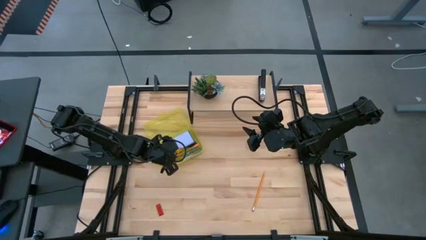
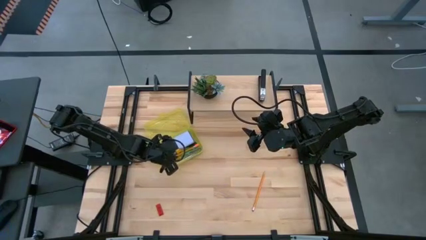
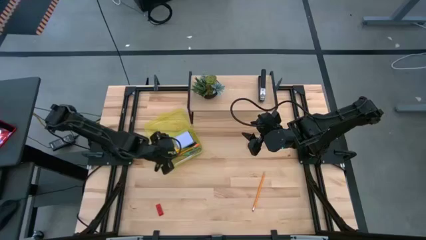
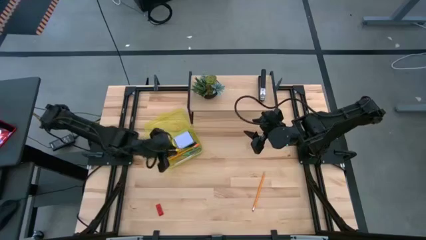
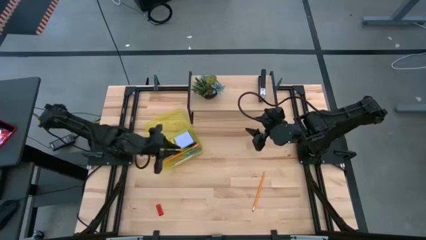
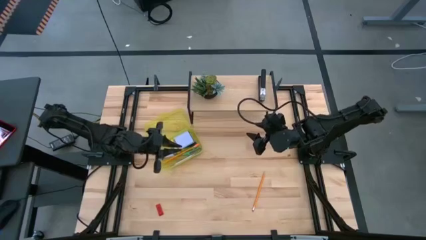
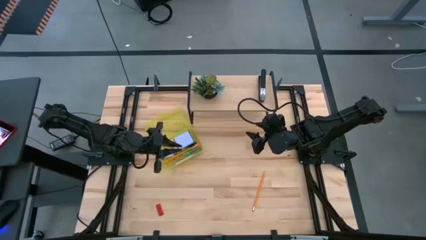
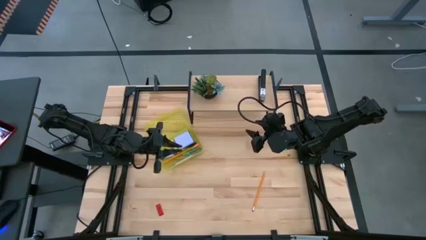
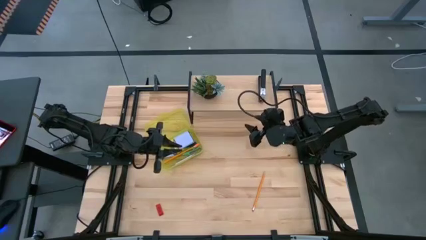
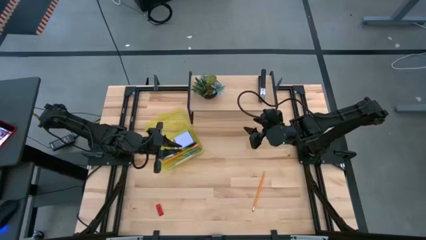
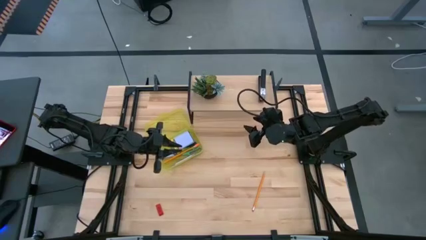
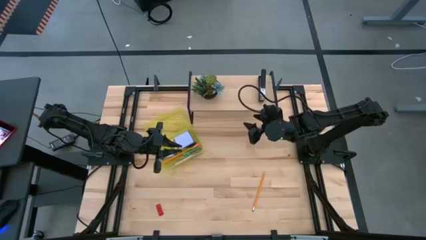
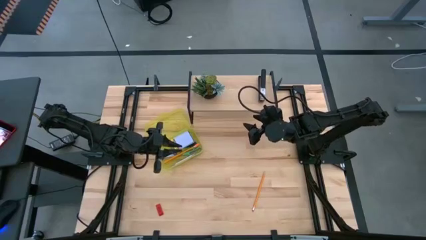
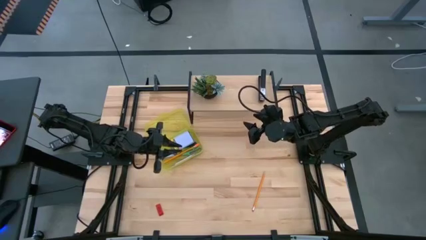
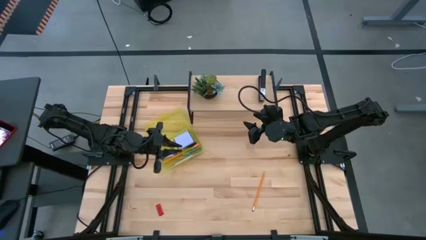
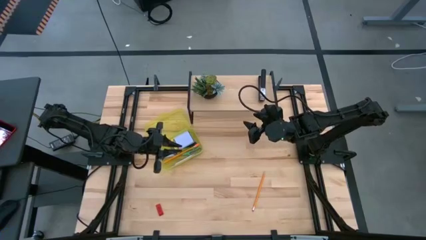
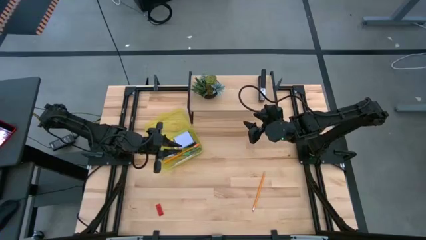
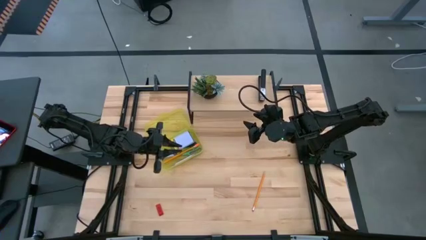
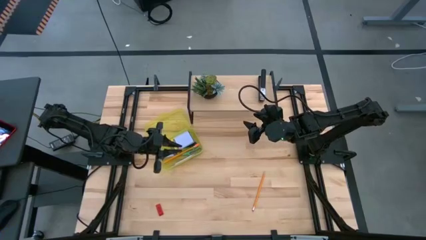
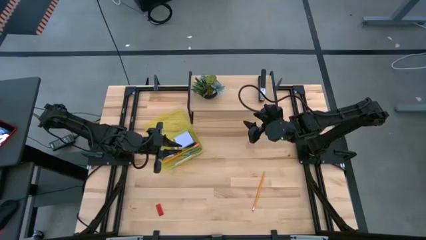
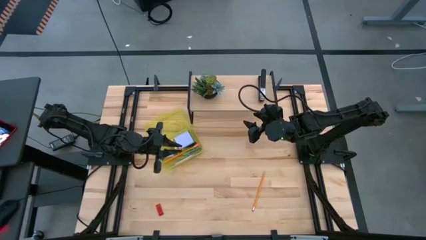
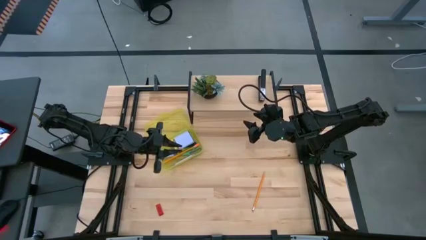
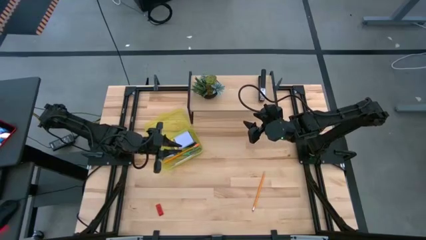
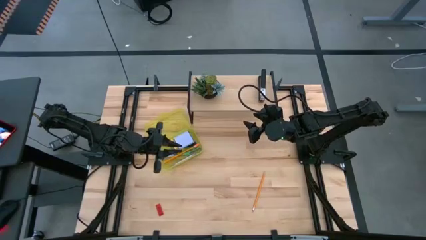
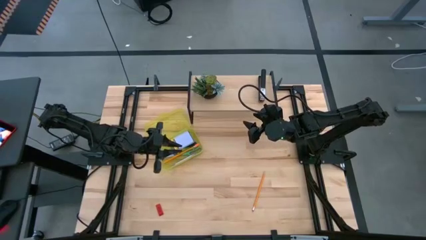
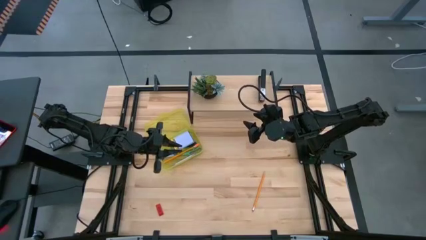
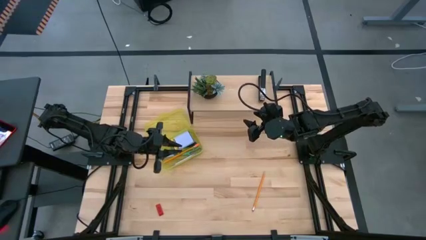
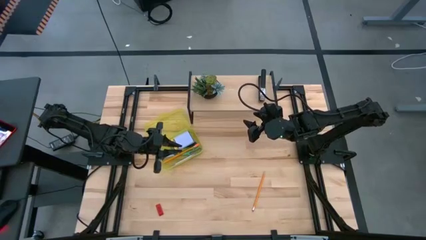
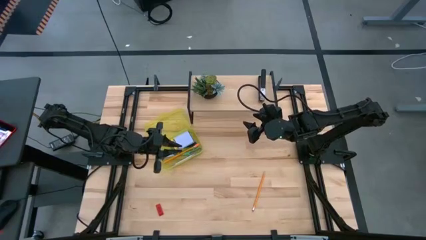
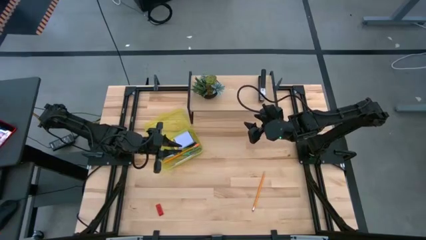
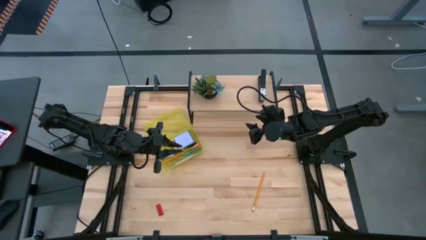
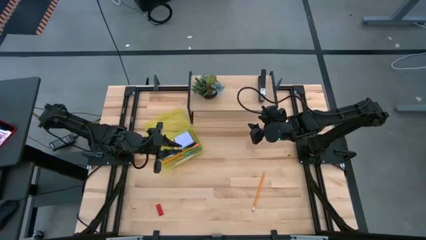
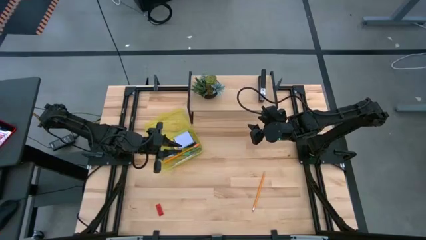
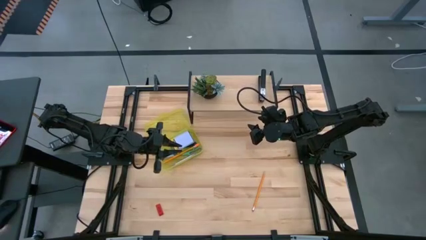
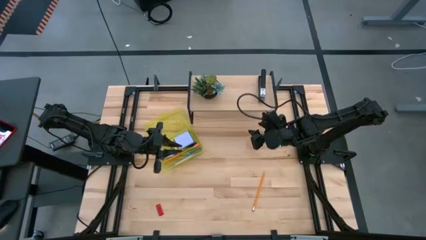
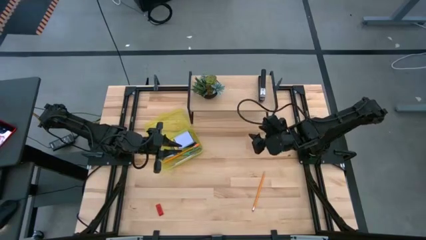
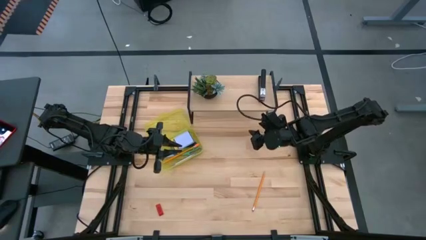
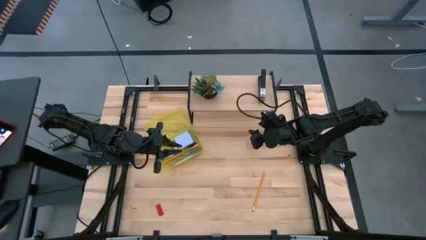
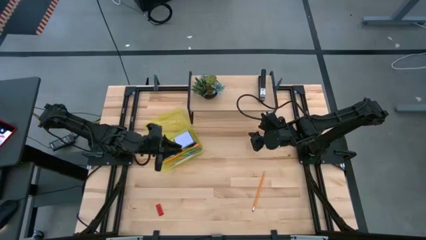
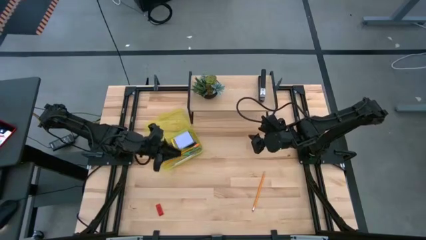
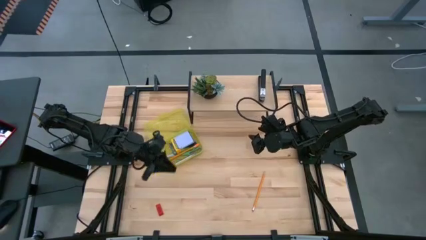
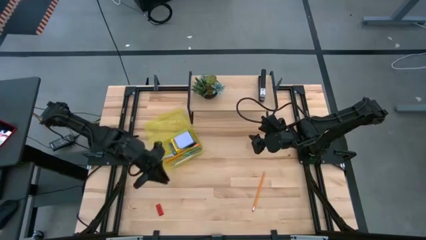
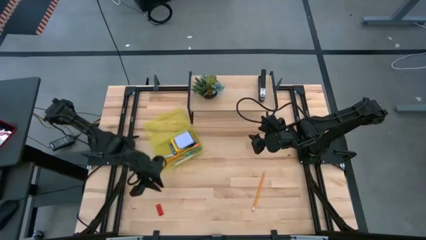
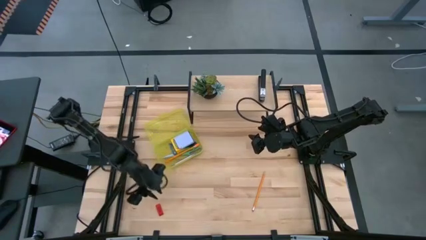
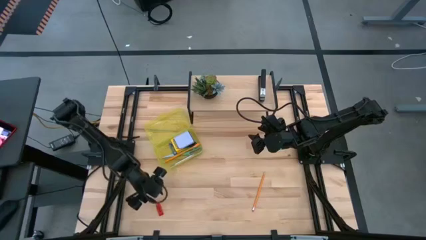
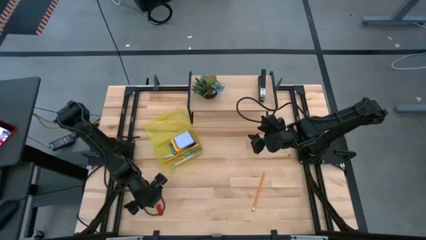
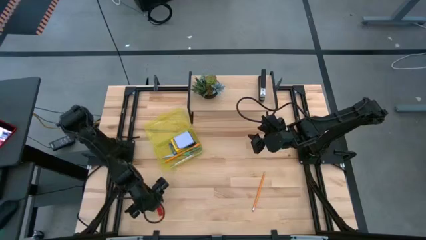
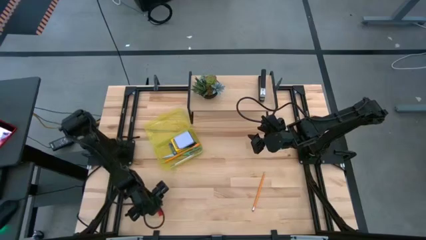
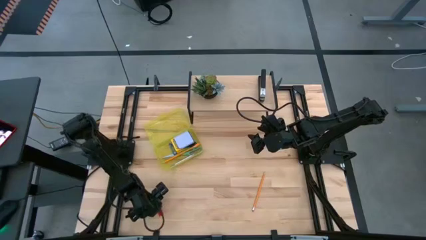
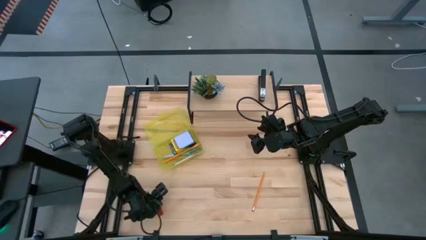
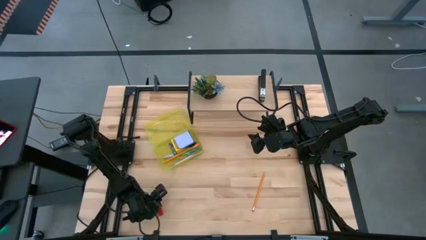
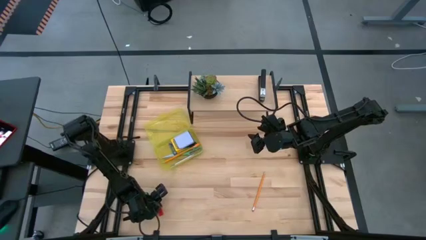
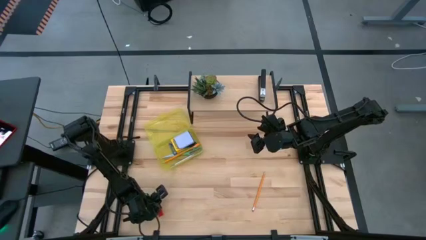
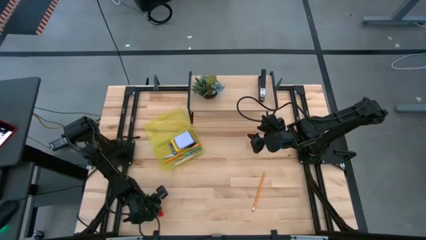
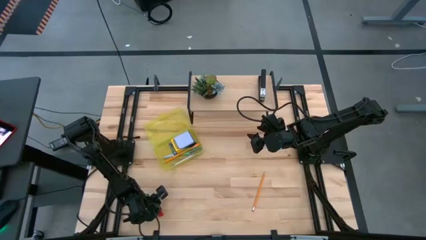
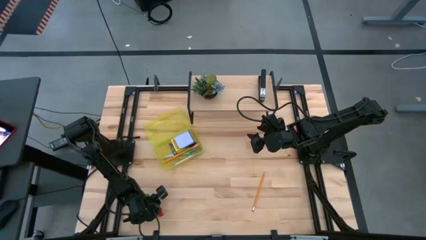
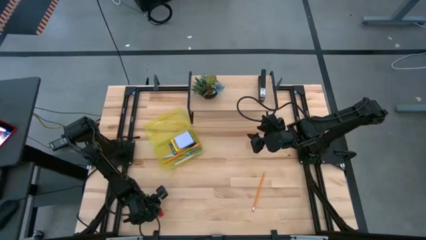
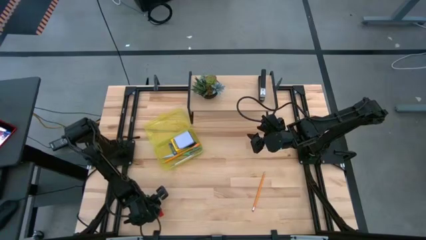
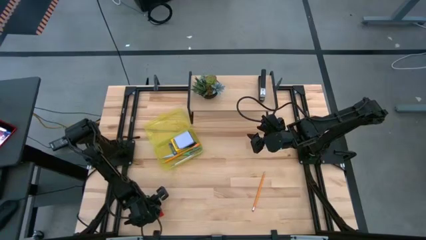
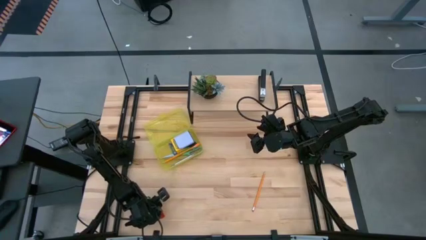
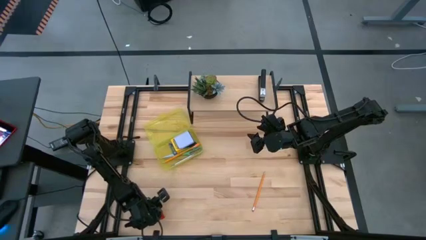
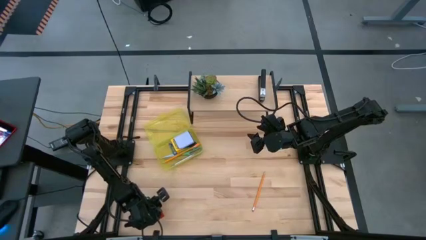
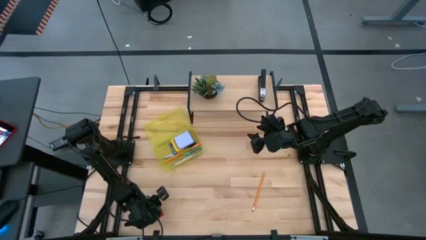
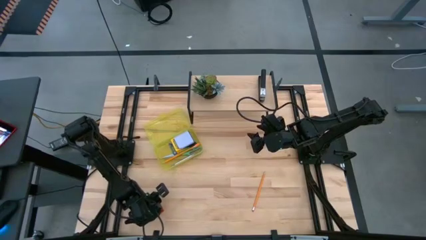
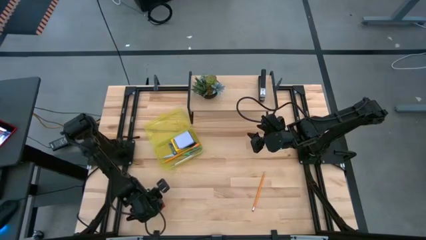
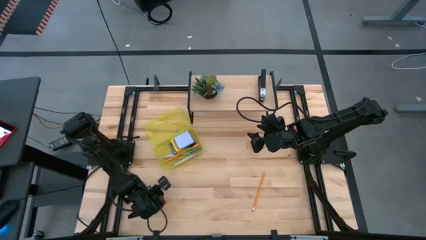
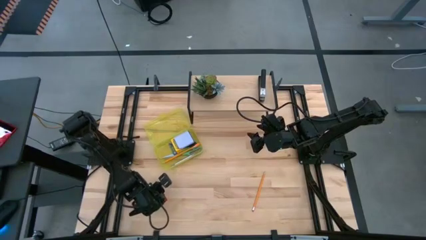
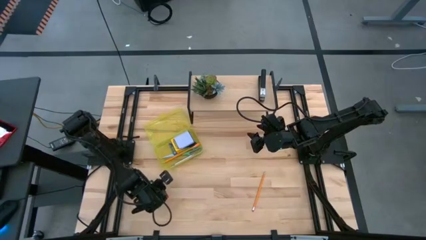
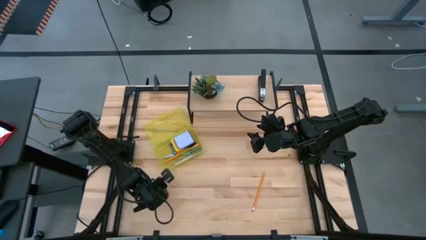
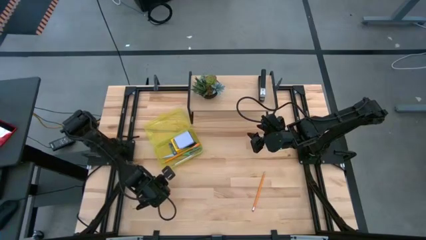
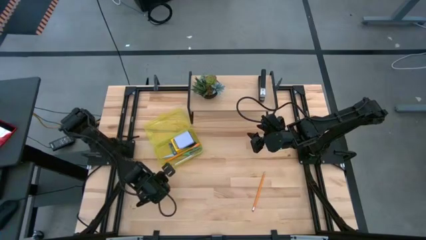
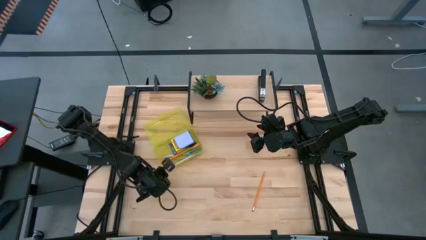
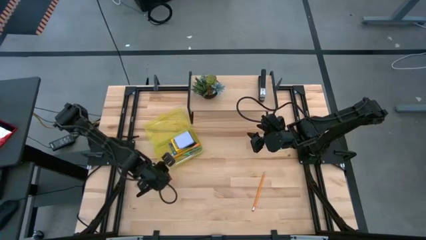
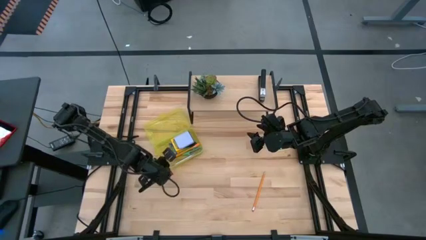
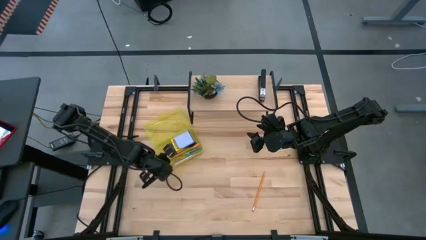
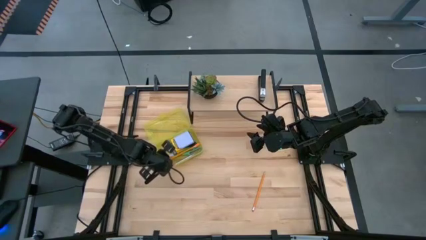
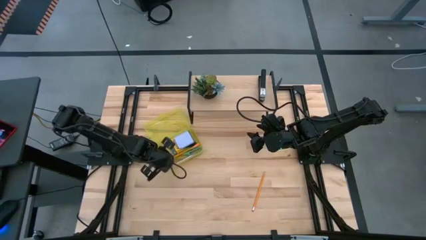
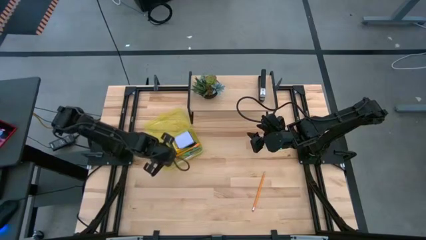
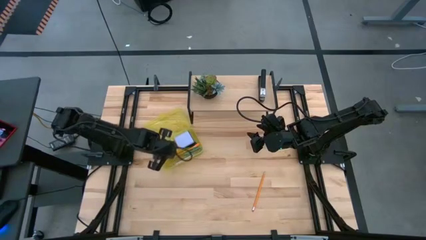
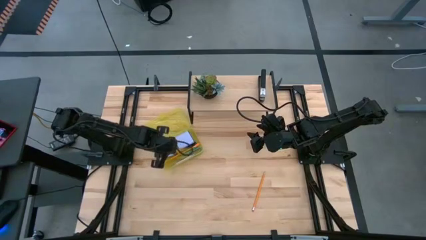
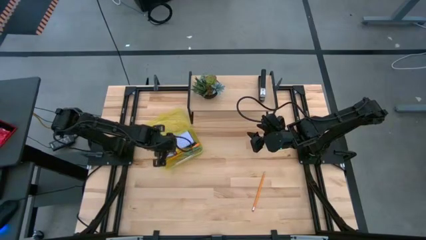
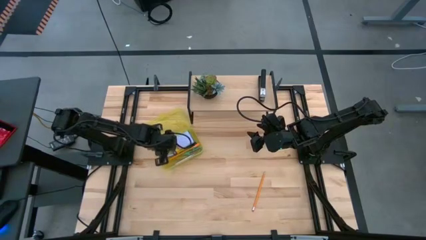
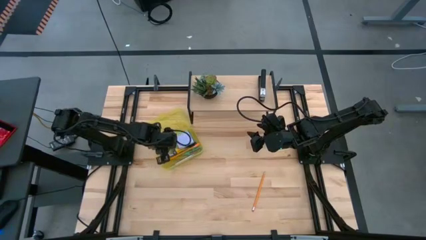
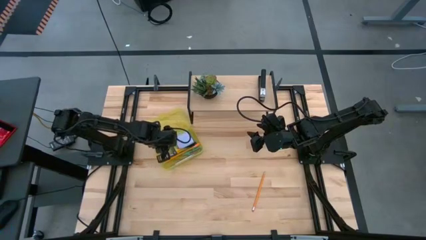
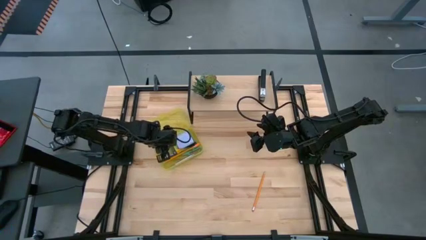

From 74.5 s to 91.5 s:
Task: Pack school essentials
Put the red eraser into the yellow supply box
